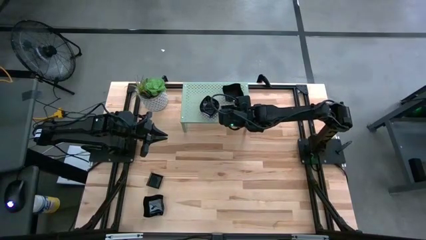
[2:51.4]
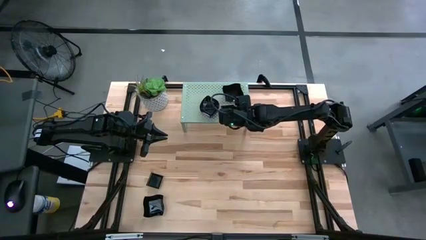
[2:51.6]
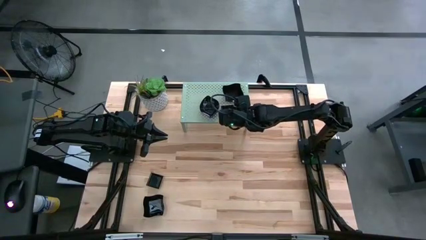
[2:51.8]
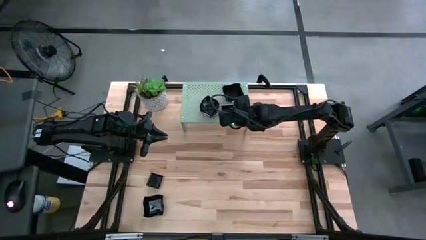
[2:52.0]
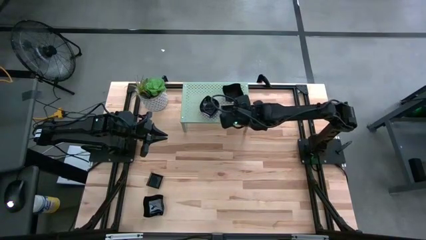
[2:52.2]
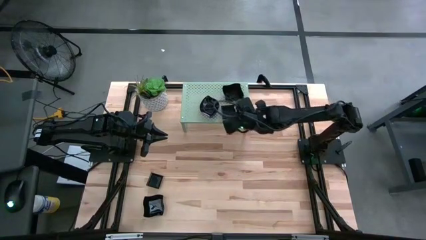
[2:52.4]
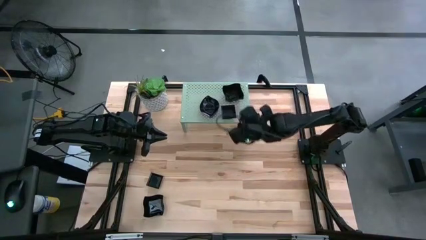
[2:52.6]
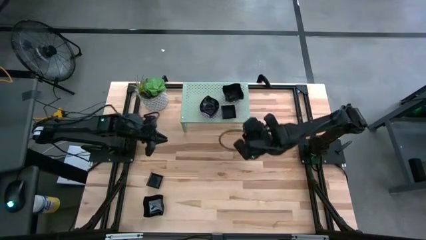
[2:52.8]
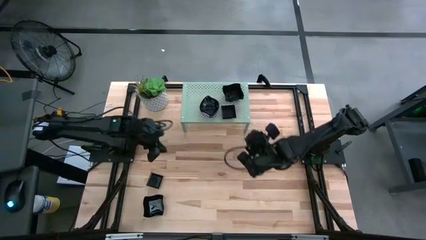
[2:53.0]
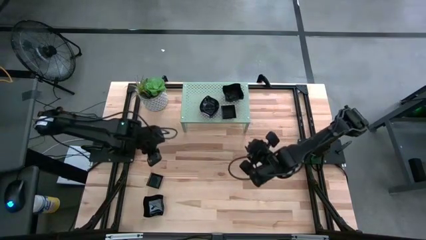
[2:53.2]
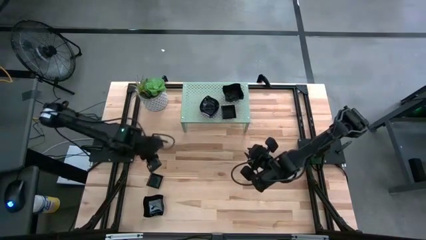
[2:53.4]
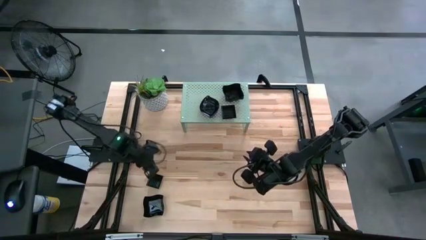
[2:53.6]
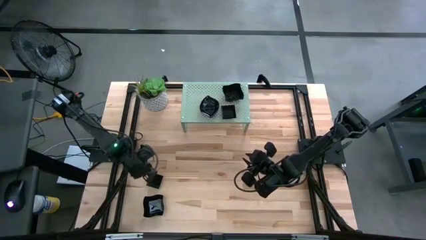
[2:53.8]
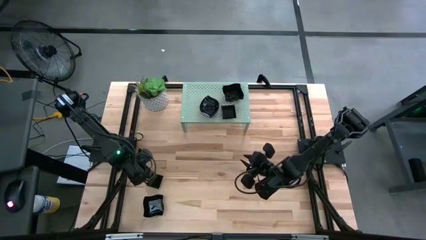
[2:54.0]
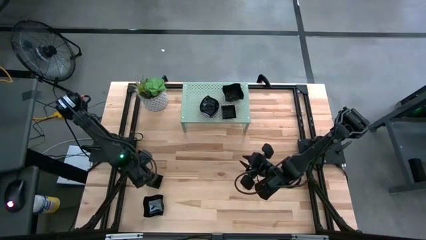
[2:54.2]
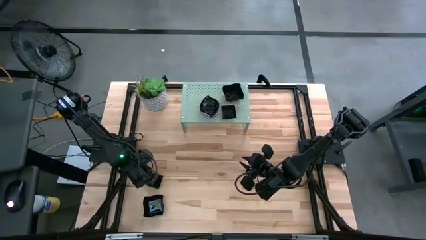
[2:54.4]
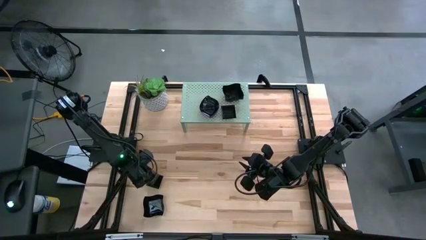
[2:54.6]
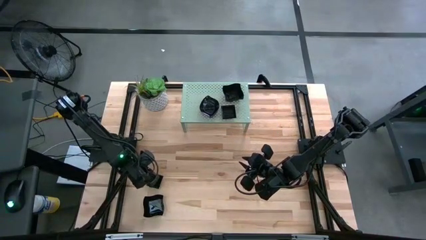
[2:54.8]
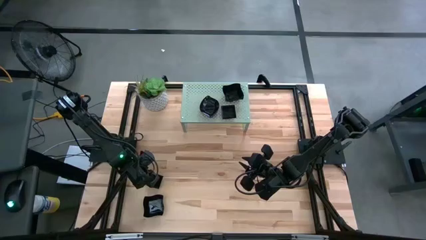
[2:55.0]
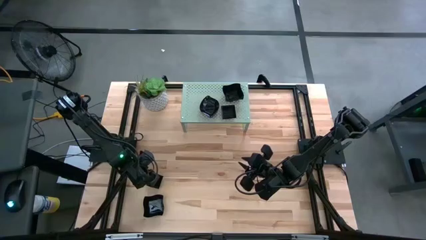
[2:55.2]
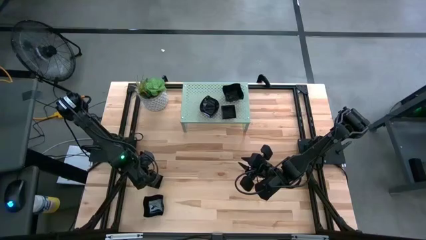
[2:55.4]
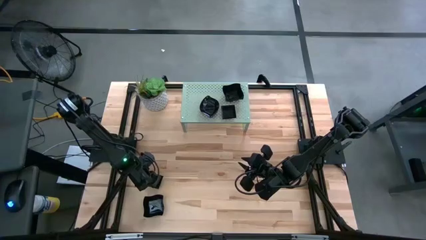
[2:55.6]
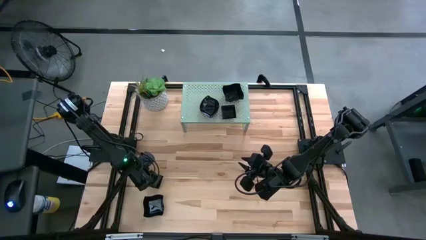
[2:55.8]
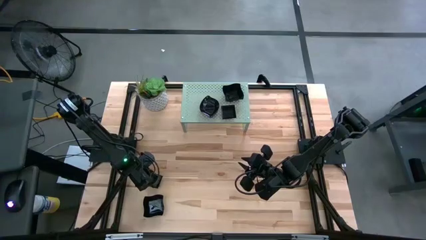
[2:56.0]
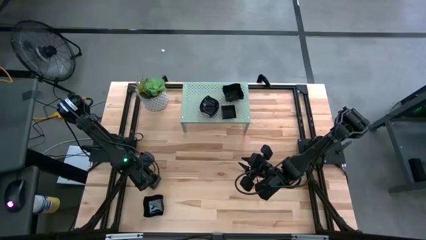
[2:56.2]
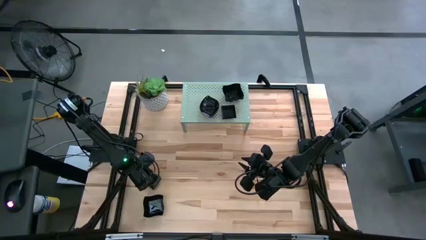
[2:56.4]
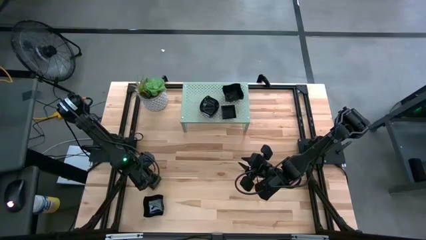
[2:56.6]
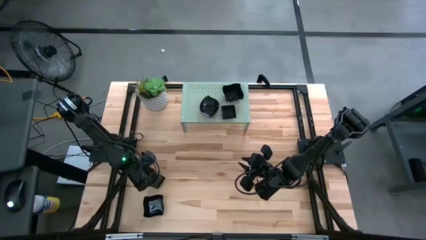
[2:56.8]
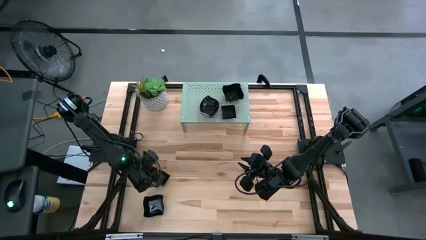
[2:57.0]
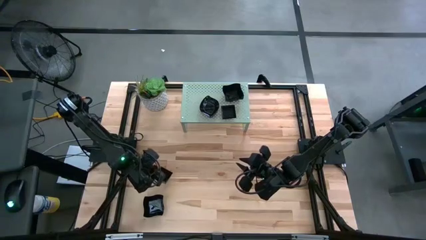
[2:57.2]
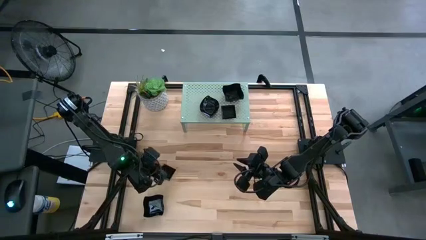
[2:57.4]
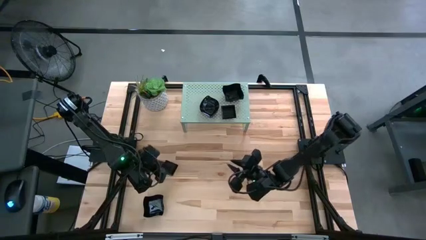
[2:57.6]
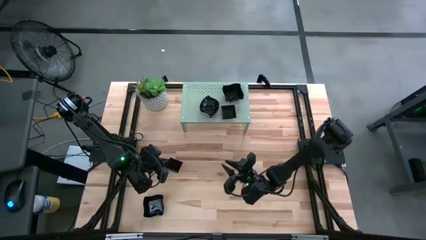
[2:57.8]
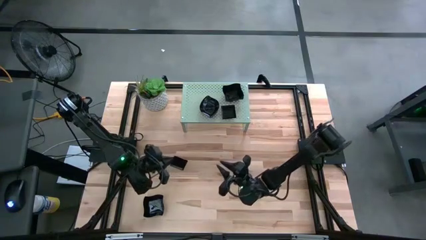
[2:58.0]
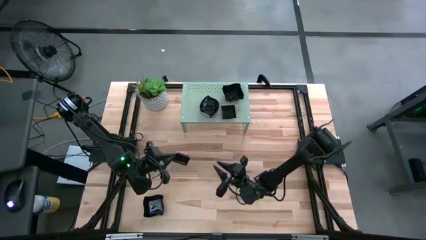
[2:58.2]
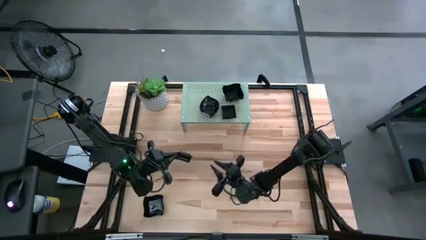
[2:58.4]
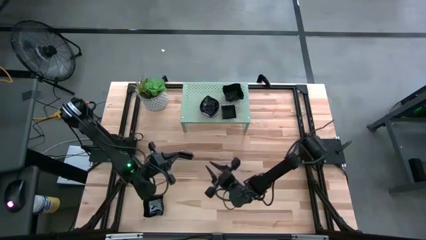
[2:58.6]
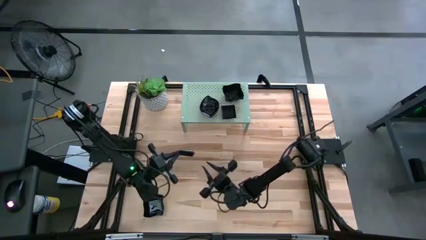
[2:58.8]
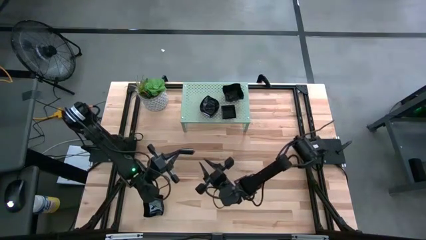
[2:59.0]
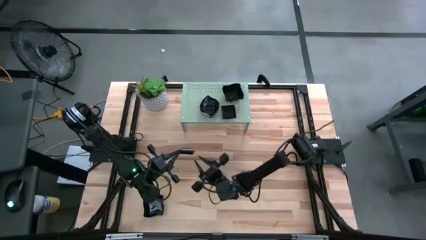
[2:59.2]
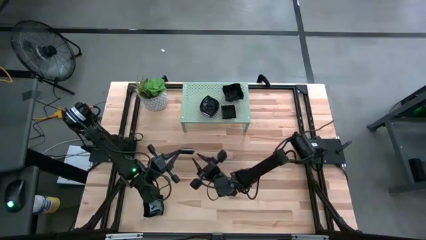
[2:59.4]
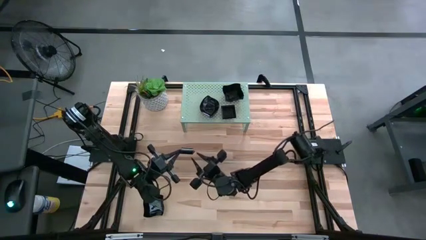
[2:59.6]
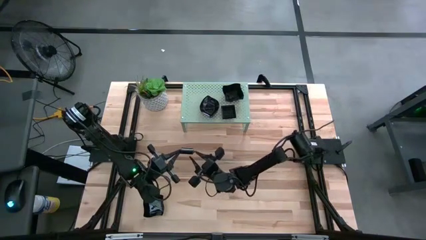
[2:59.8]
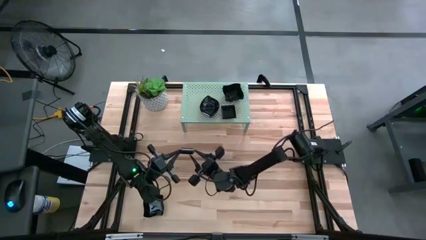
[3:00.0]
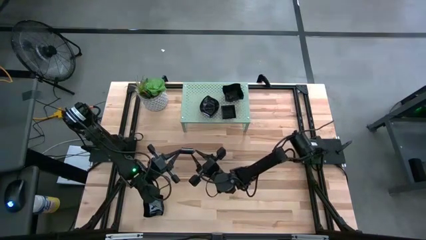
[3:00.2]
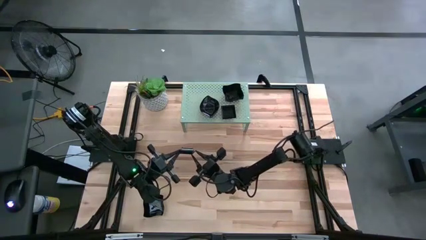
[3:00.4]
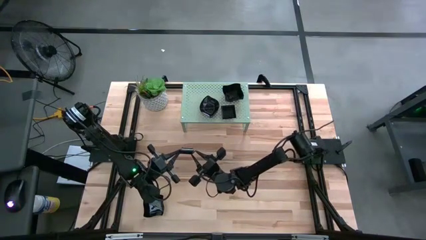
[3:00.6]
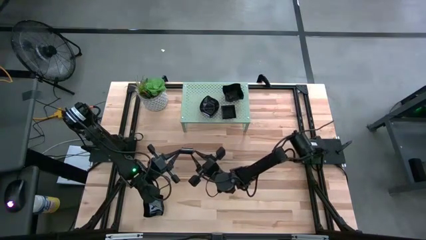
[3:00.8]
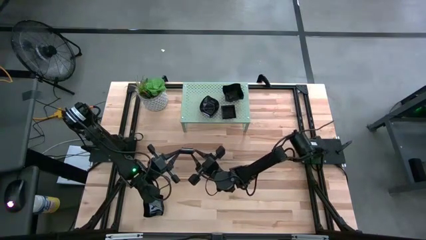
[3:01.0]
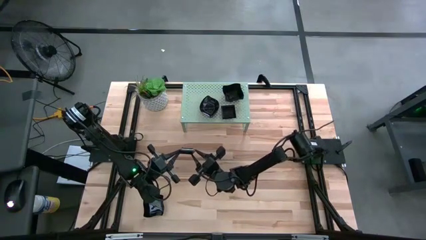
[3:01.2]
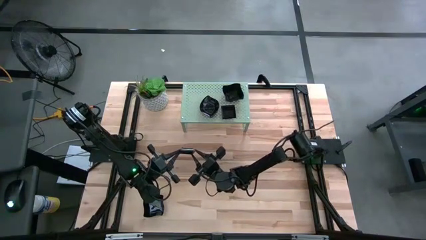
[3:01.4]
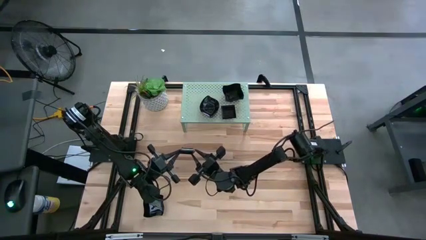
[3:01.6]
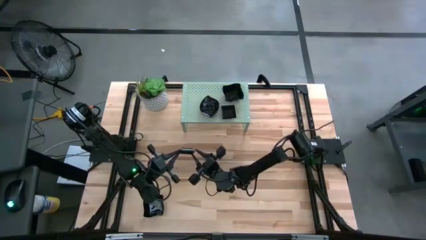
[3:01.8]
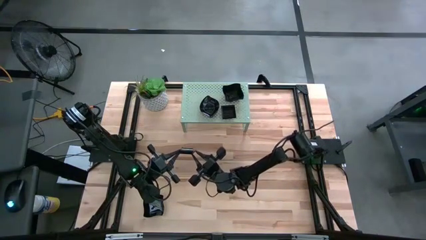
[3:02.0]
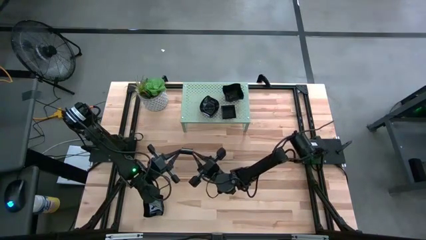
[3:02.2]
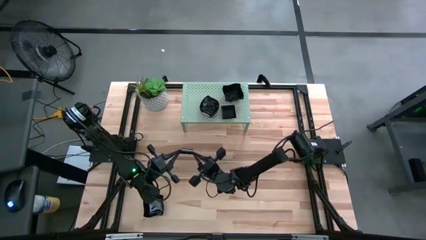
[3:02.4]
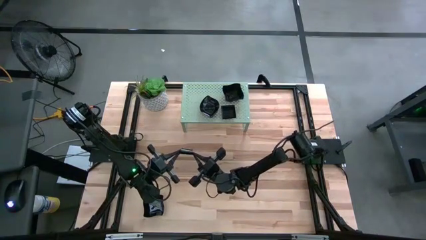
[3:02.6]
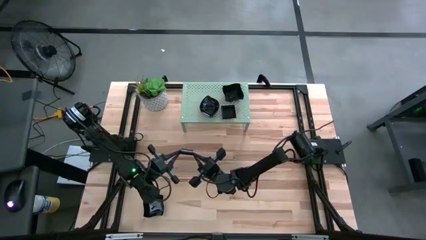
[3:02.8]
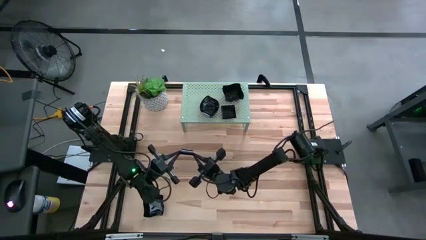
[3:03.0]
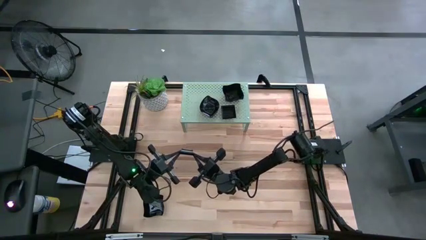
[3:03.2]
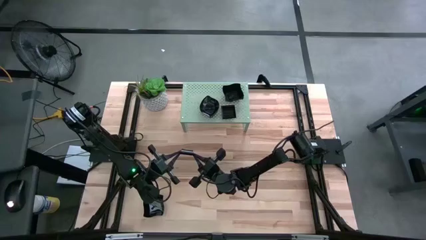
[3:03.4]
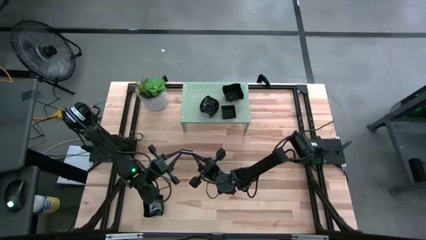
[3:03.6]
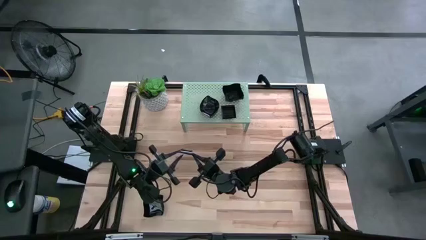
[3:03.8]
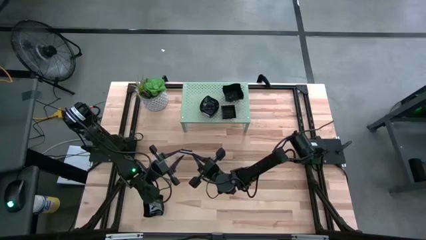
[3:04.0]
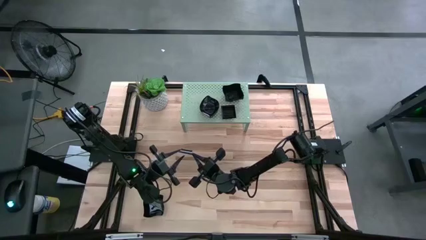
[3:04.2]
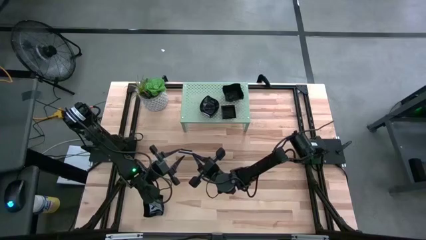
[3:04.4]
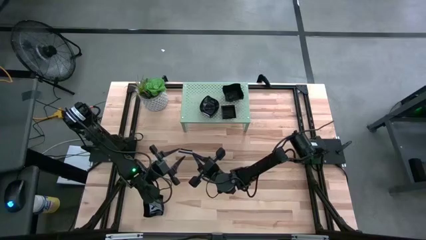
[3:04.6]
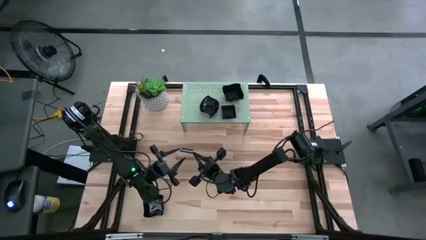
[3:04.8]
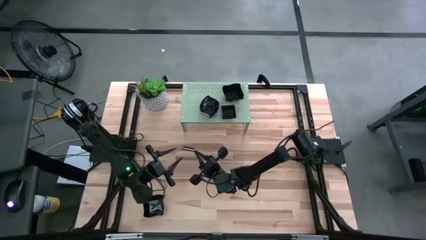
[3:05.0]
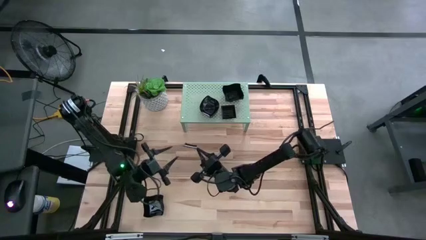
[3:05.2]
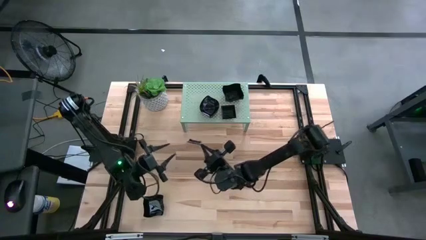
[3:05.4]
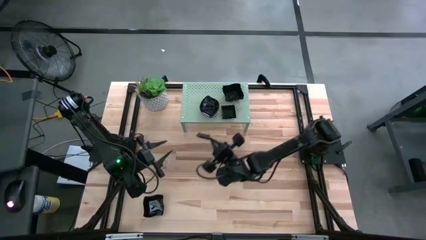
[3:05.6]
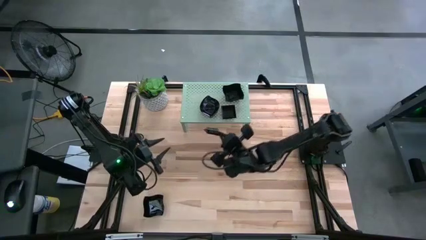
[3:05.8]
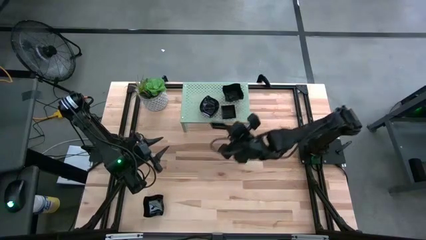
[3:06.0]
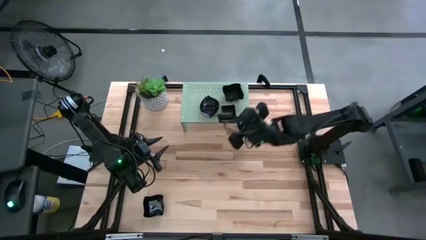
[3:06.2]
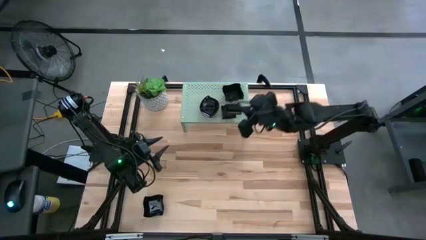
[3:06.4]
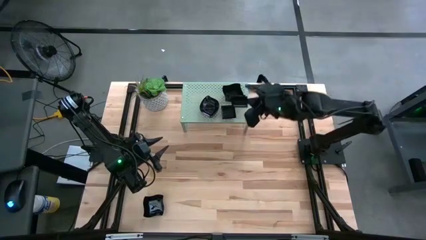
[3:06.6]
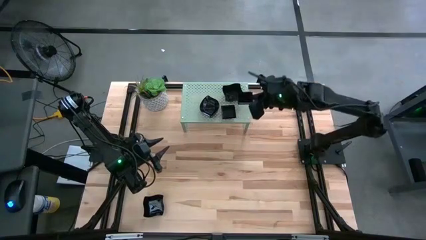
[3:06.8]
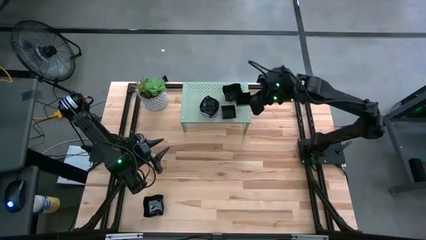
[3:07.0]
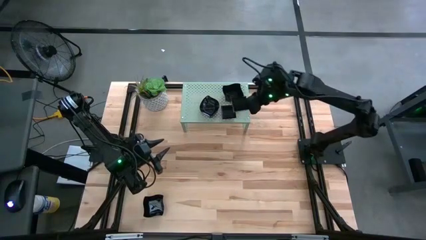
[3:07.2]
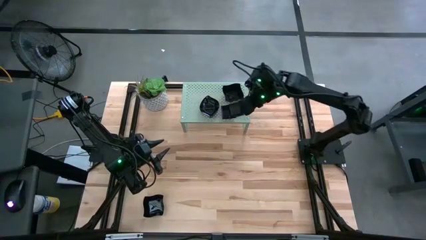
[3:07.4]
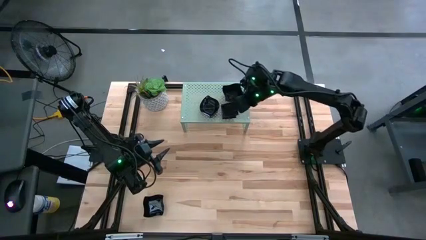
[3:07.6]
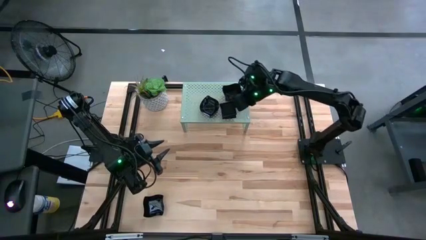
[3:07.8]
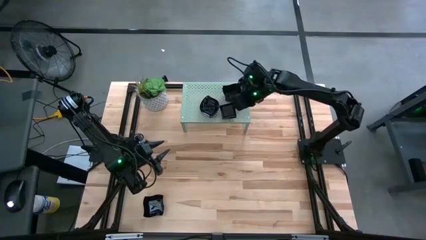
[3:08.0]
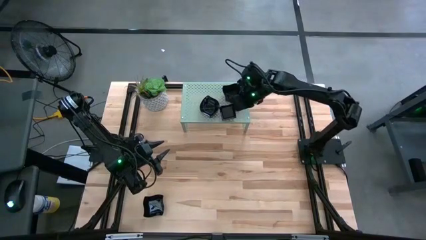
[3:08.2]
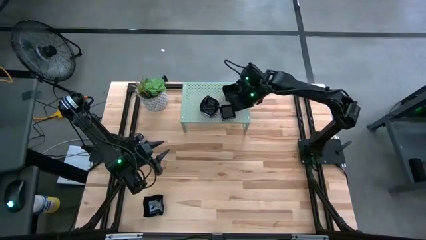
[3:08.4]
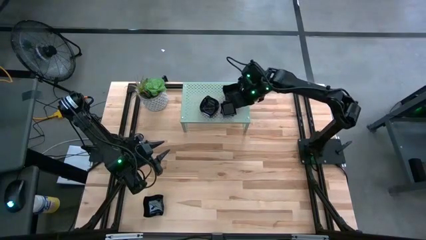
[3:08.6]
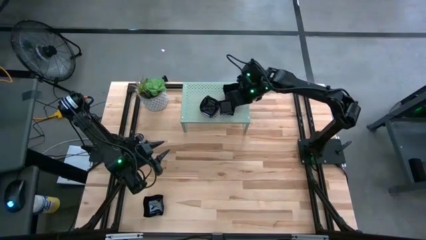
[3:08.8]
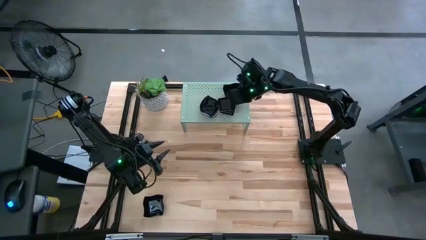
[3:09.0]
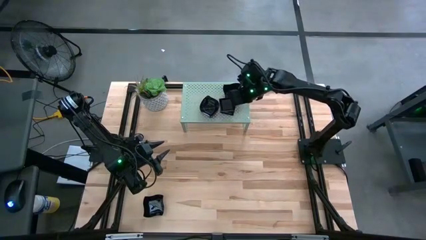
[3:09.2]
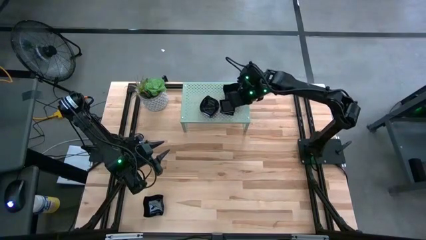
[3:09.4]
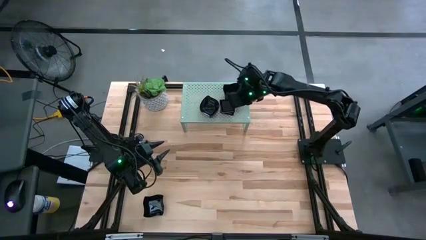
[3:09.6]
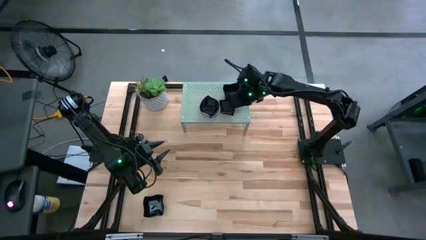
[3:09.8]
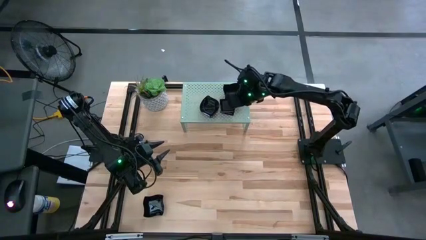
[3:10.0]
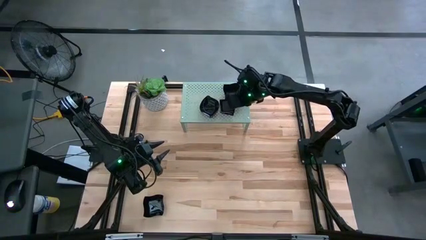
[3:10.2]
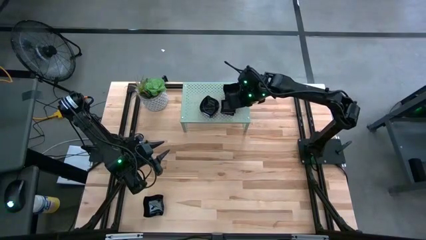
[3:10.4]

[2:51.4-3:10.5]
Task: Pick & Place Mini shaped plates
Stack the square plate on top of the square plate on the shelf
